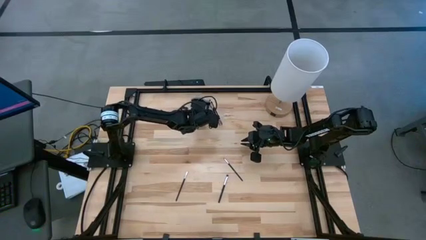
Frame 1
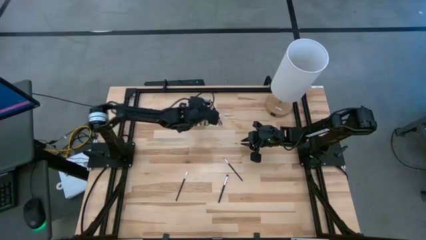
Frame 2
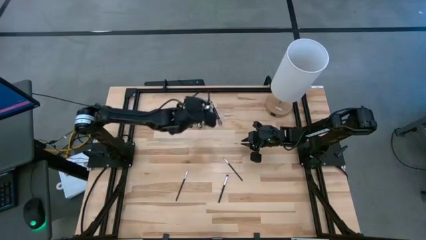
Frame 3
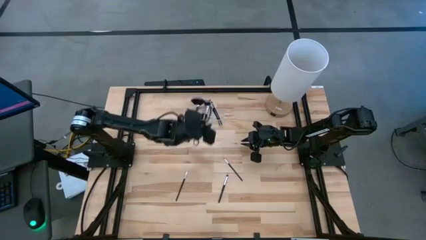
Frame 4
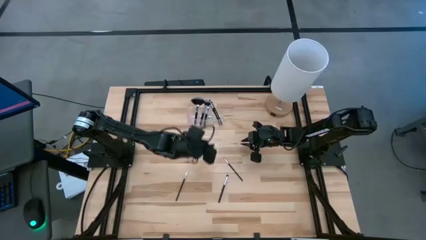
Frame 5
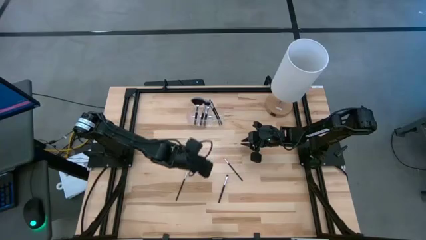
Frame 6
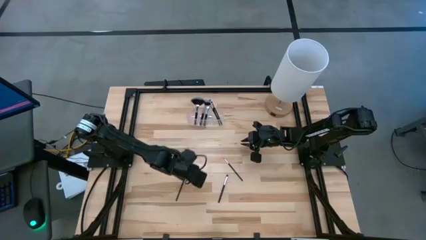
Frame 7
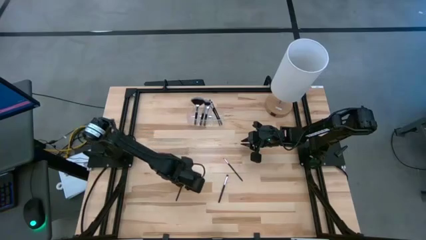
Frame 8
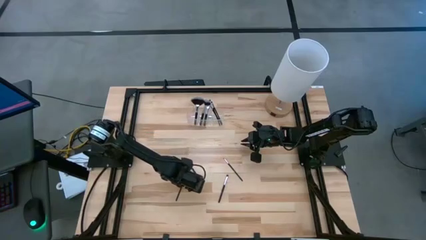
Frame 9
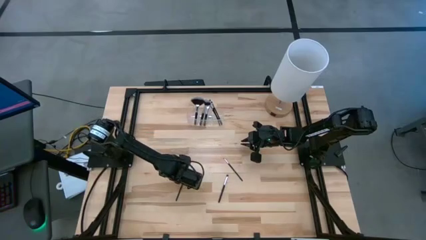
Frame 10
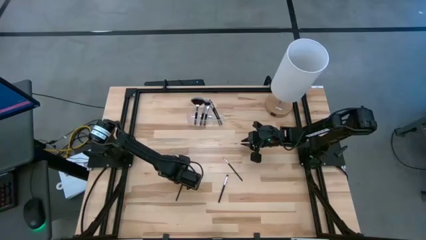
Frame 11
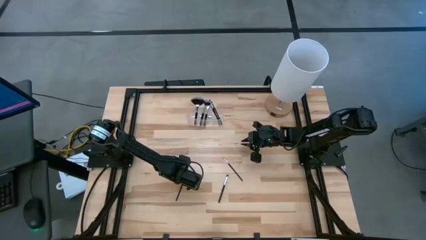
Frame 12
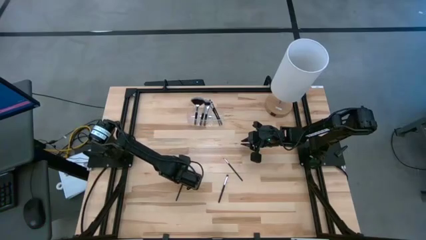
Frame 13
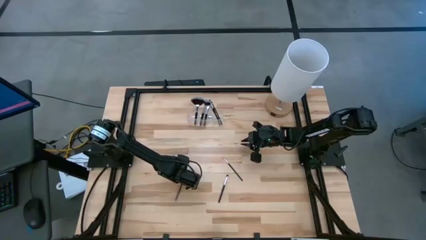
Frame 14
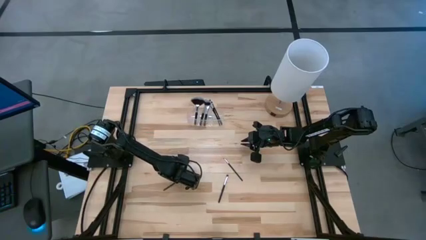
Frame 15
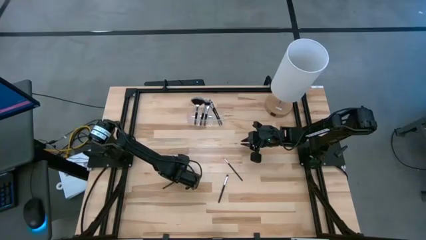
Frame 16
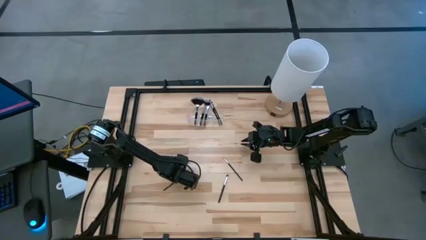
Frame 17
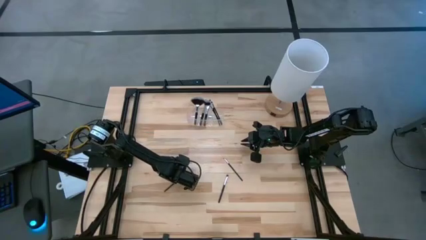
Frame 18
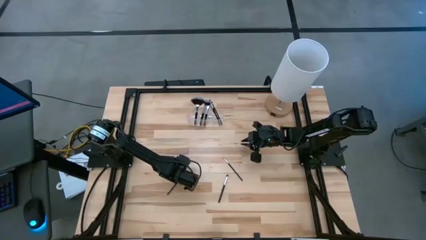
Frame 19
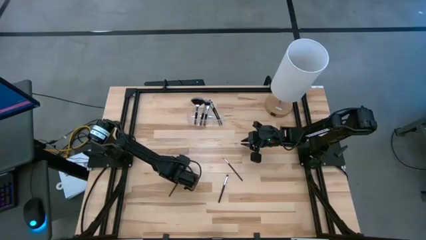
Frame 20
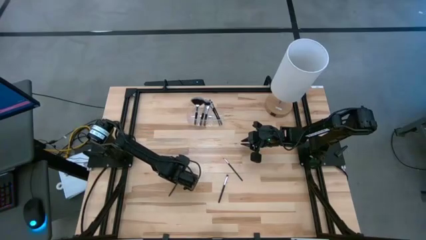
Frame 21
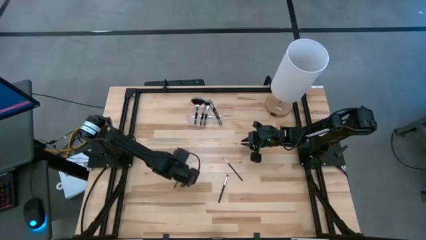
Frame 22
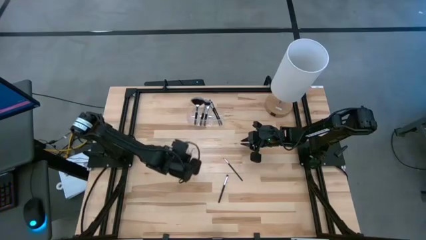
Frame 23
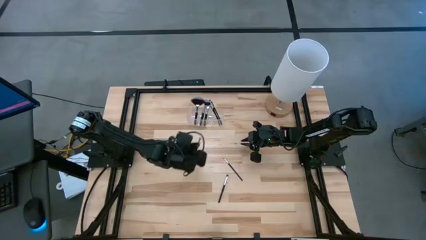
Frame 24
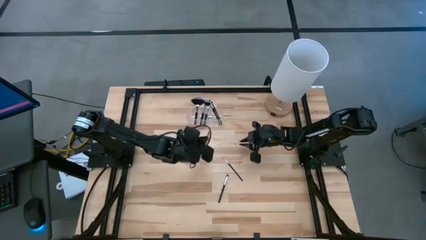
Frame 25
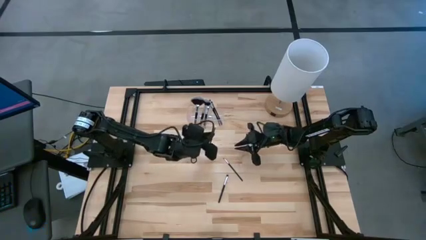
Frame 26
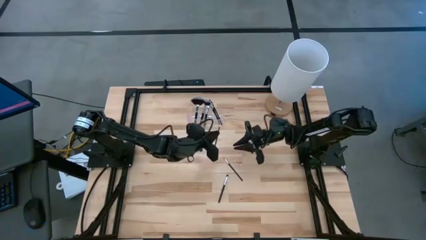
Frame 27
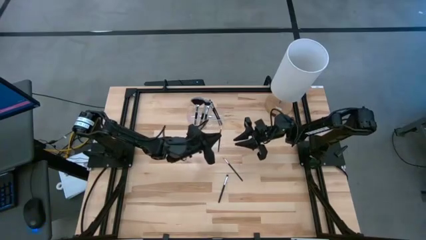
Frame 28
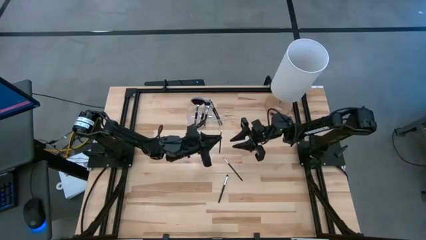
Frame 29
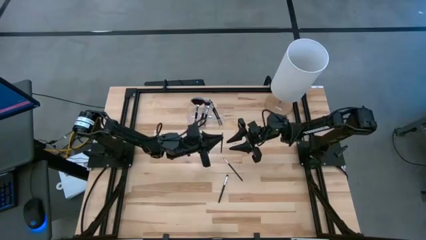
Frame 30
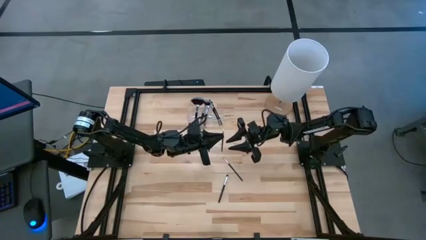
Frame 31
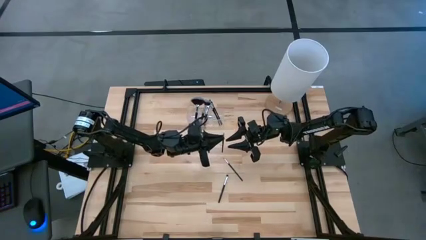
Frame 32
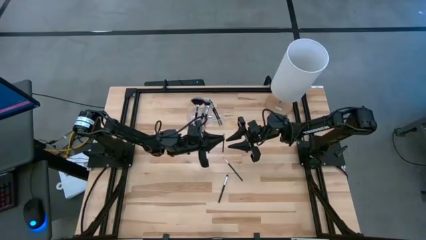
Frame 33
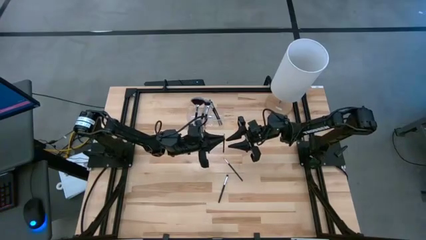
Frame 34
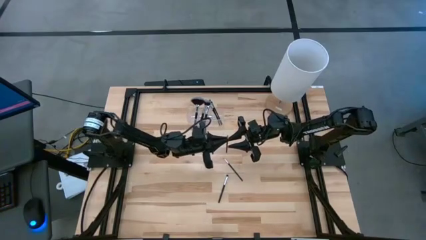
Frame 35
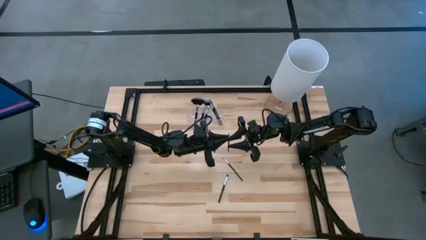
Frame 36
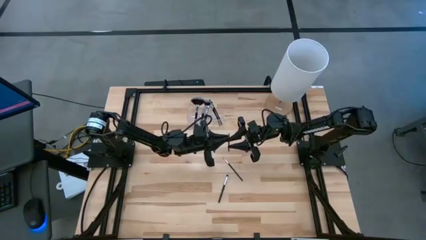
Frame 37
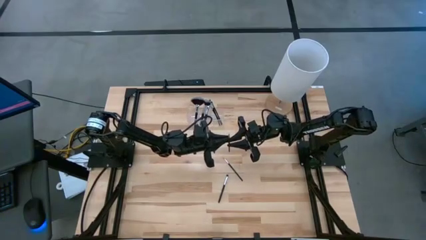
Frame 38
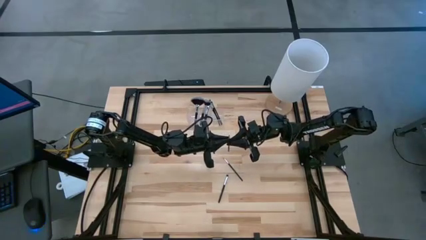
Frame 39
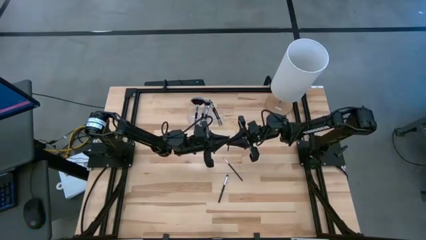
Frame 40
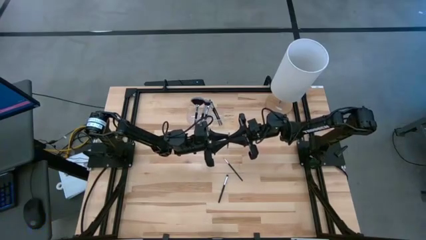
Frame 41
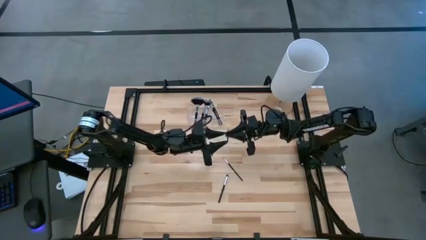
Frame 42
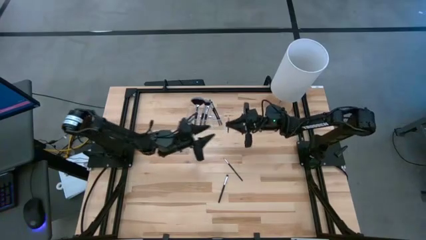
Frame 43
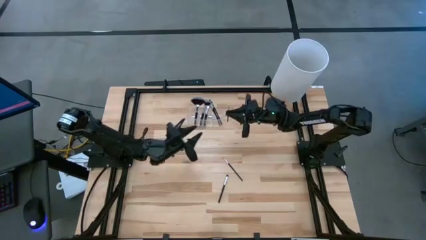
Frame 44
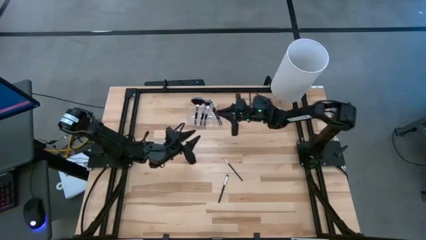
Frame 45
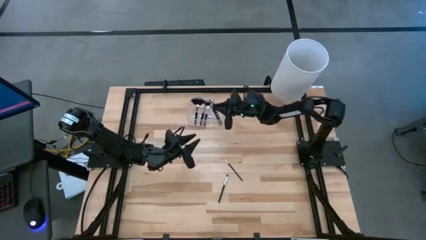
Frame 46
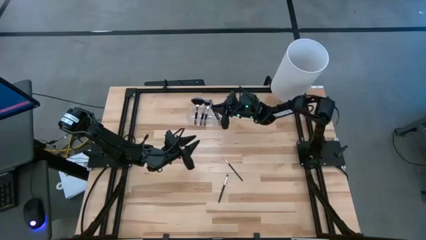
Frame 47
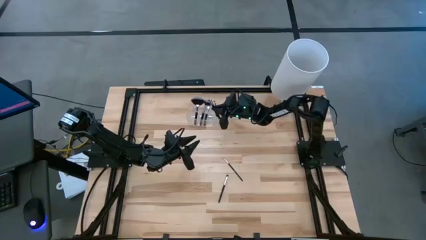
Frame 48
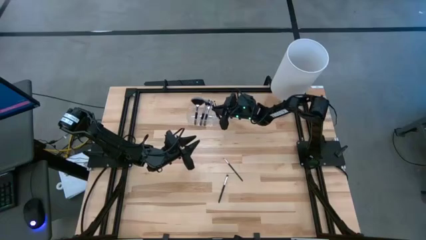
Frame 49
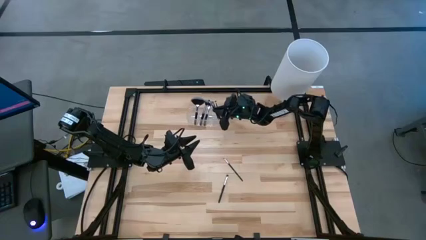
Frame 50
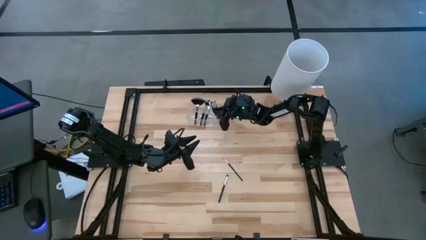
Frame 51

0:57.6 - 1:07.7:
Task: Pick & Place Makeup Supplies
Put the makeup brush into the transparent organizer

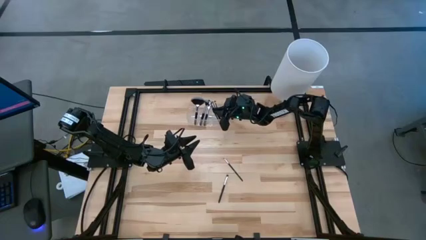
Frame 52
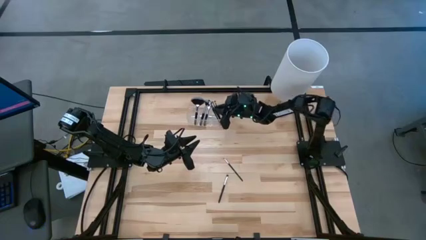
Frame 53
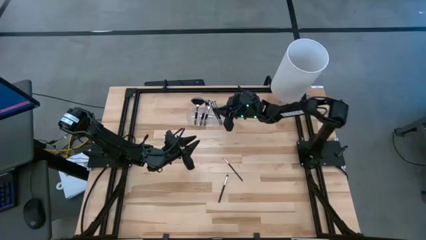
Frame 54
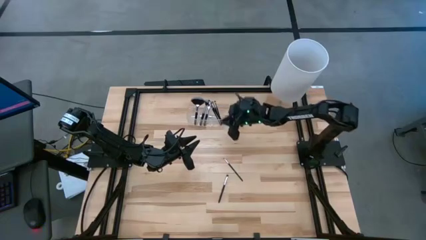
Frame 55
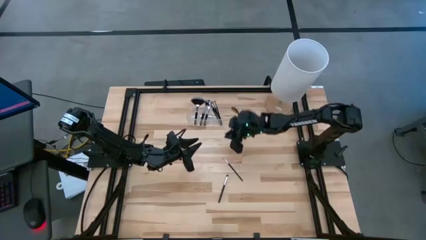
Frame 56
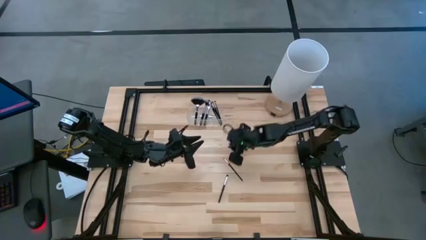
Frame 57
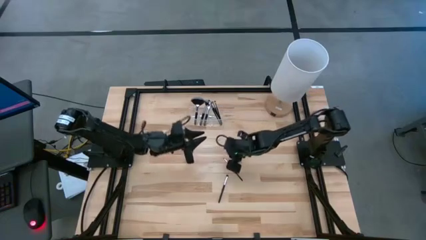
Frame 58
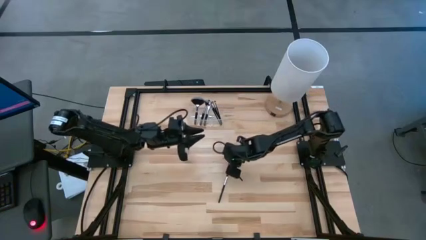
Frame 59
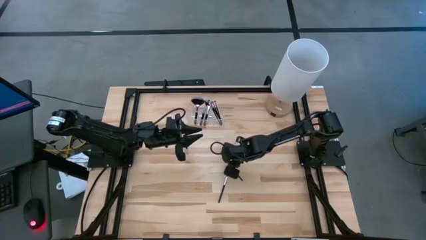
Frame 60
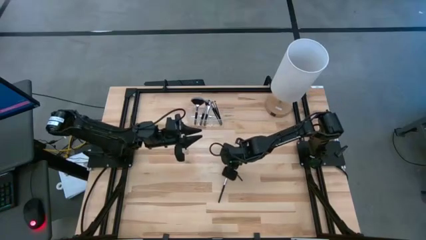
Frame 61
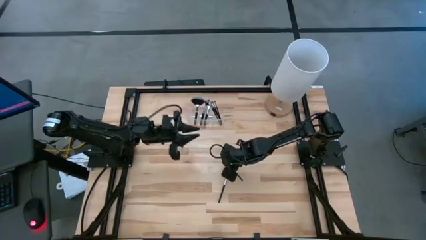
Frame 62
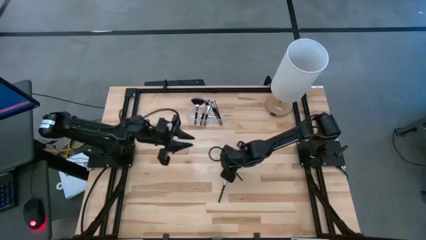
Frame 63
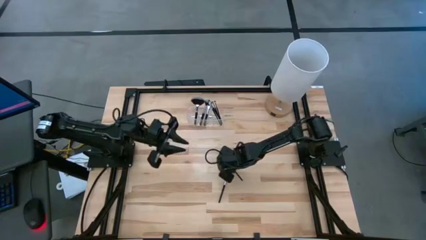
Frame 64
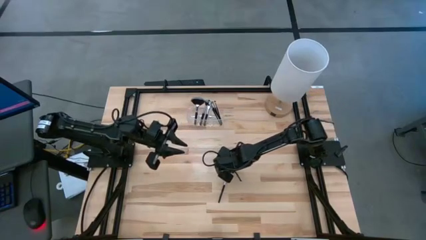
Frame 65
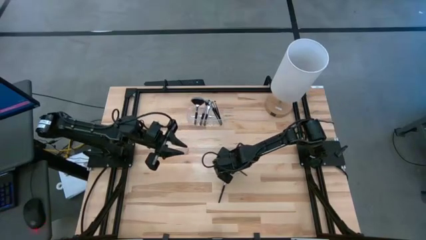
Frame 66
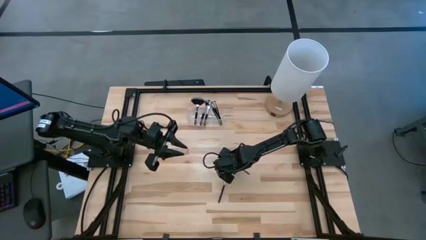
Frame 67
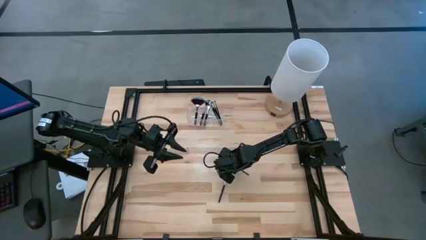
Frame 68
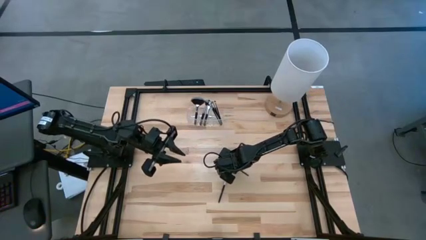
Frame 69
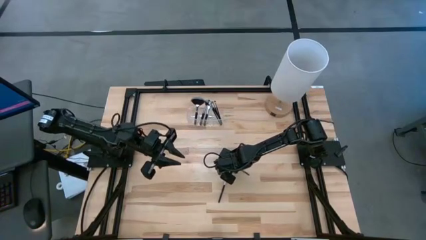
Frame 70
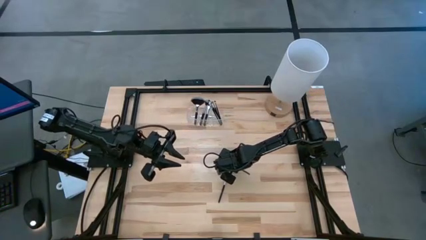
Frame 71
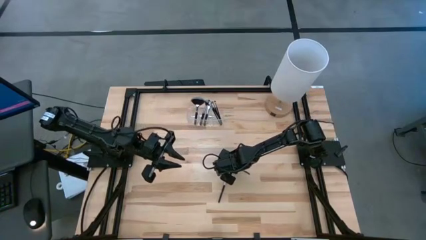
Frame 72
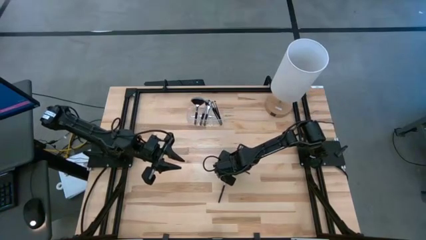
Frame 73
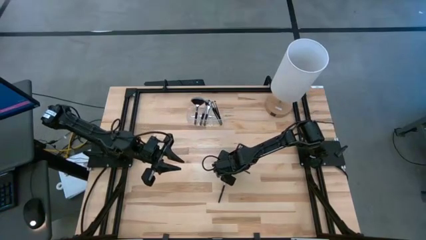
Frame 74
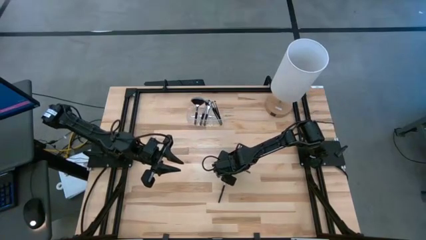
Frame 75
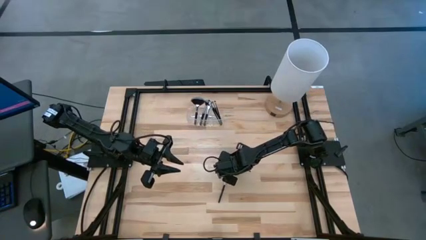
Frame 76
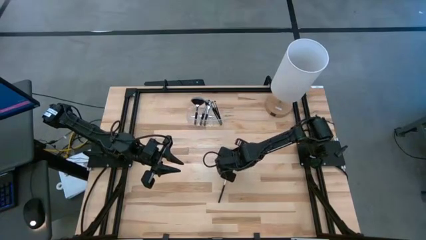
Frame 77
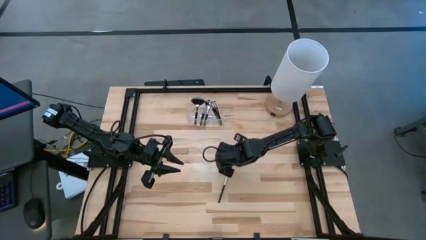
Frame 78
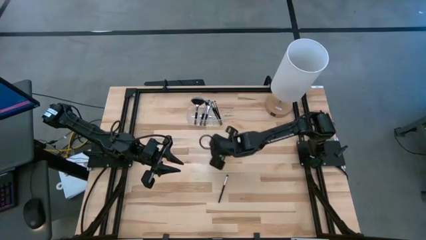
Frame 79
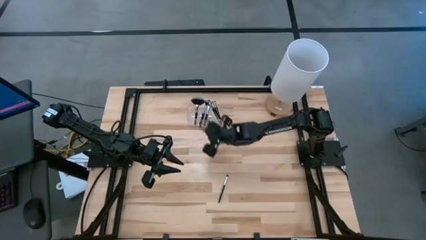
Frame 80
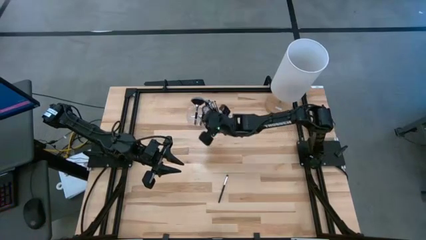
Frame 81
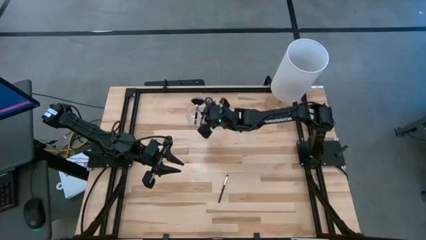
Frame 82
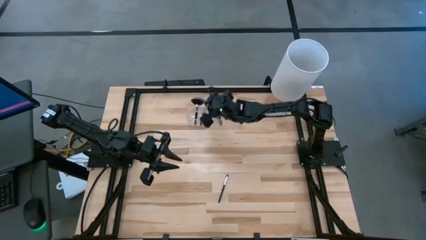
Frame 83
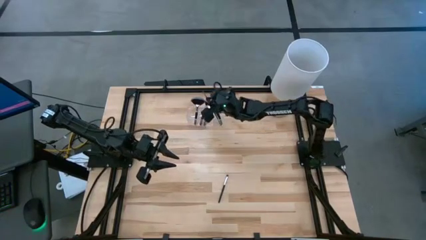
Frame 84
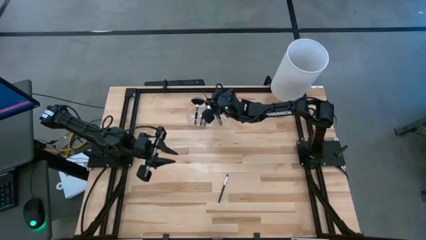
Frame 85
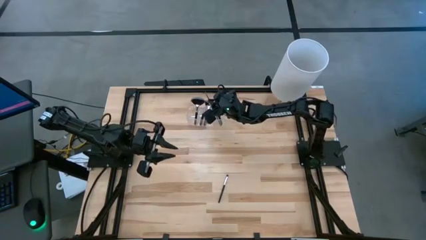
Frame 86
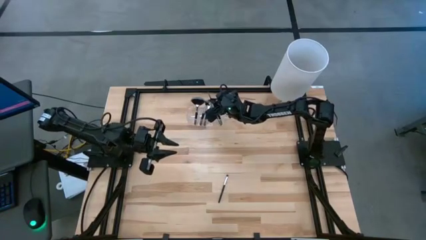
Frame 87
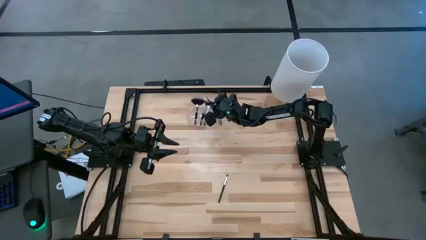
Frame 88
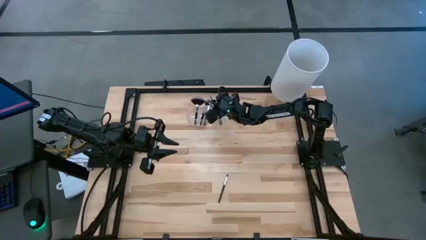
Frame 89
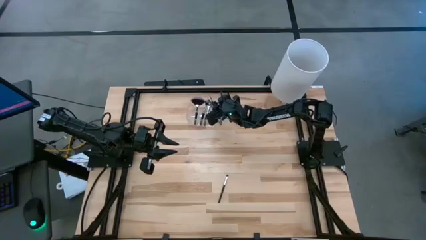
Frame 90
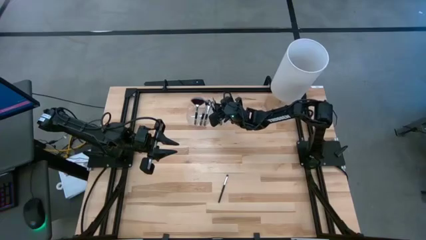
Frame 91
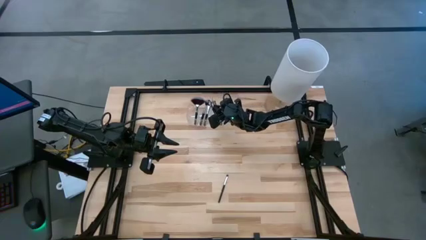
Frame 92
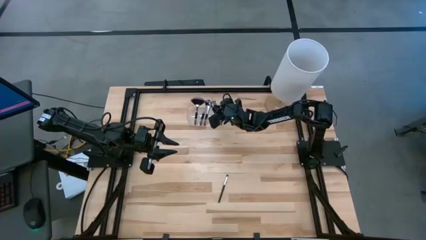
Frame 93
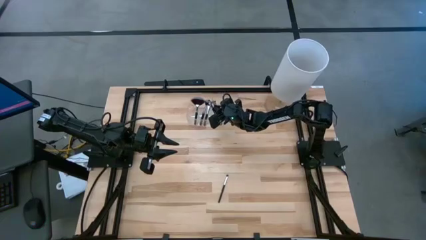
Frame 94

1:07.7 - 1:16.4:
Put the makeup brush into the transparent organizer
